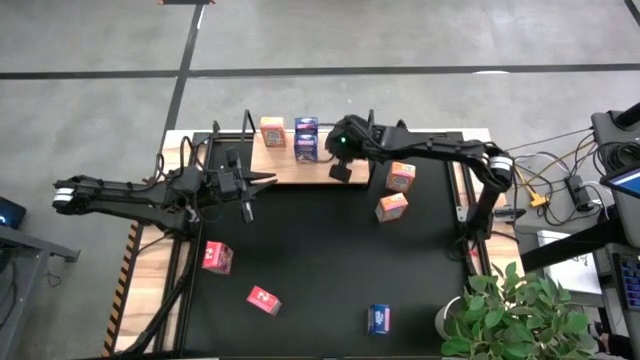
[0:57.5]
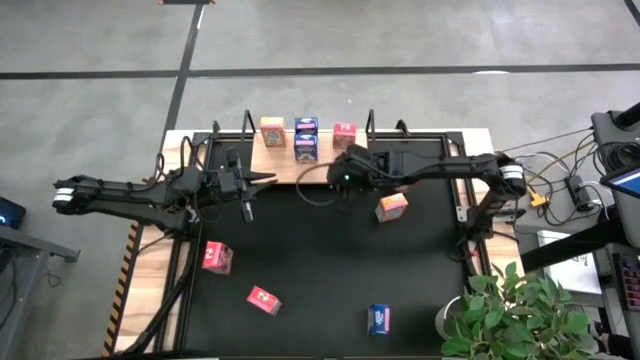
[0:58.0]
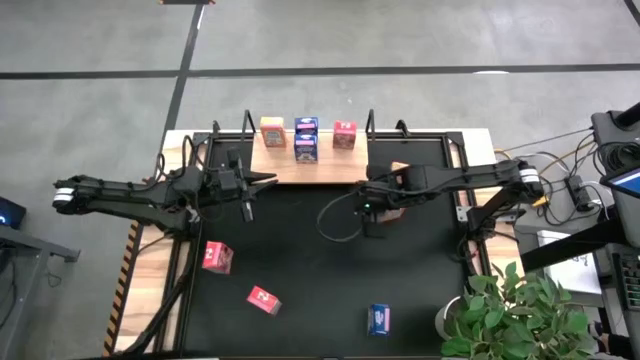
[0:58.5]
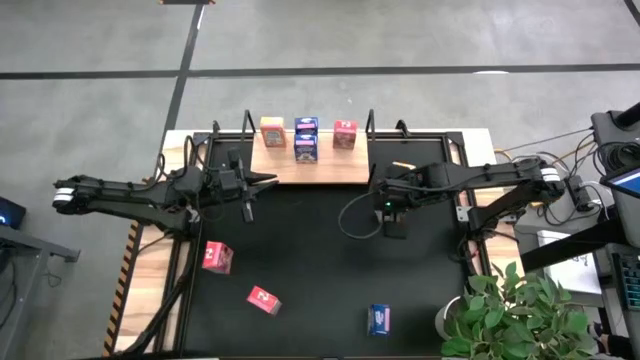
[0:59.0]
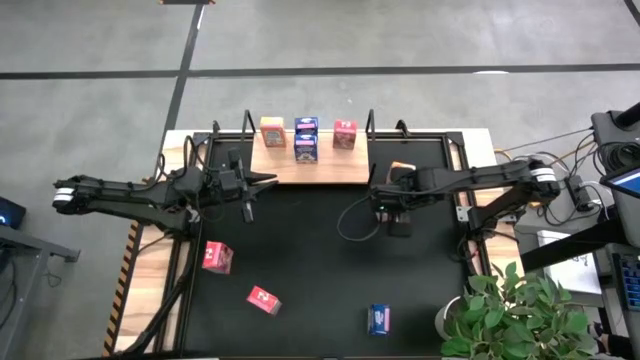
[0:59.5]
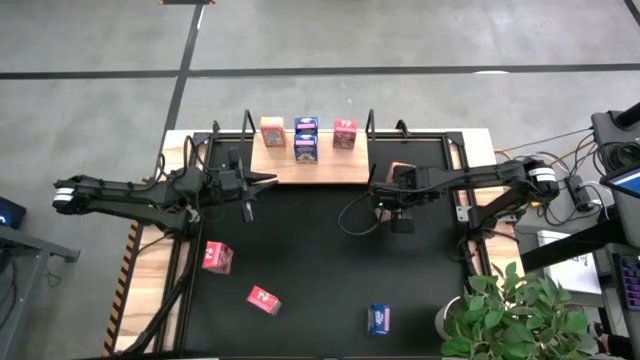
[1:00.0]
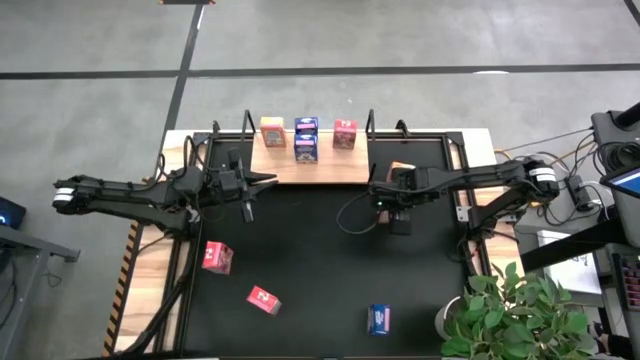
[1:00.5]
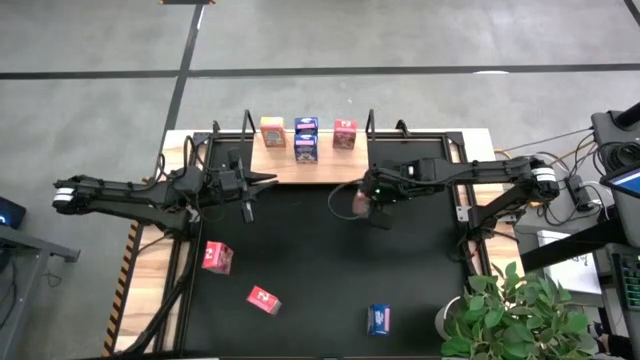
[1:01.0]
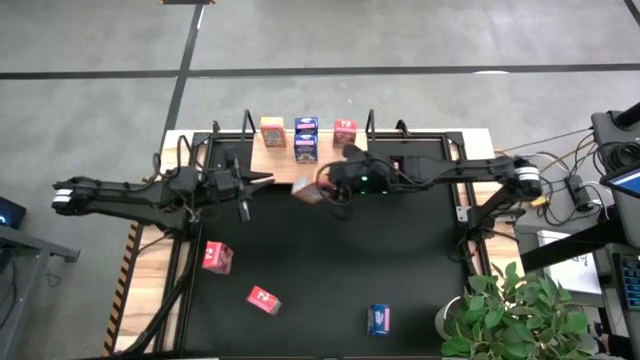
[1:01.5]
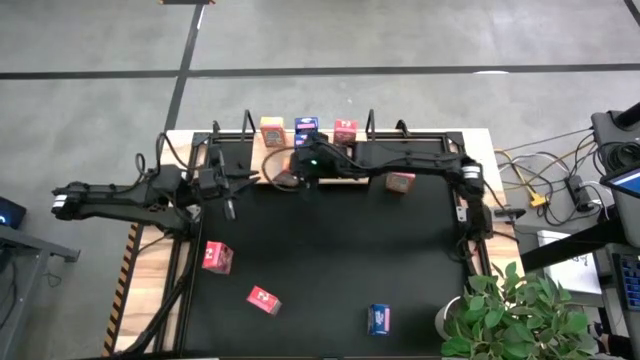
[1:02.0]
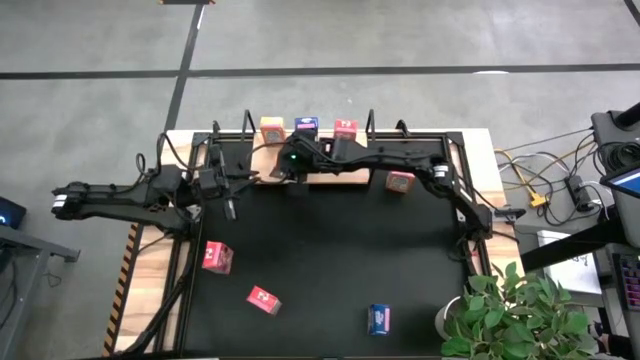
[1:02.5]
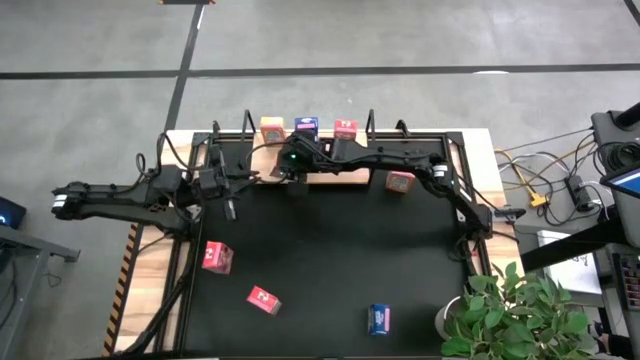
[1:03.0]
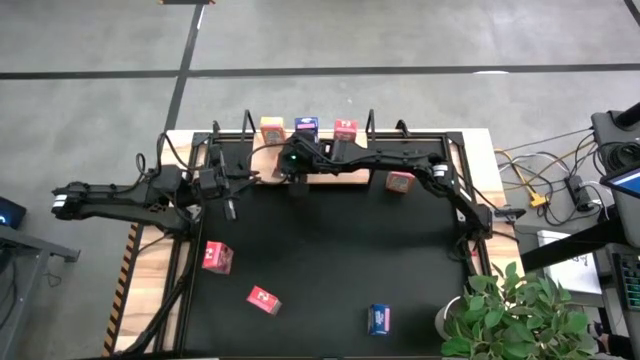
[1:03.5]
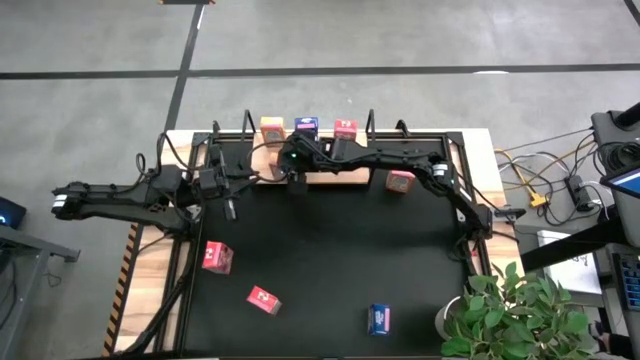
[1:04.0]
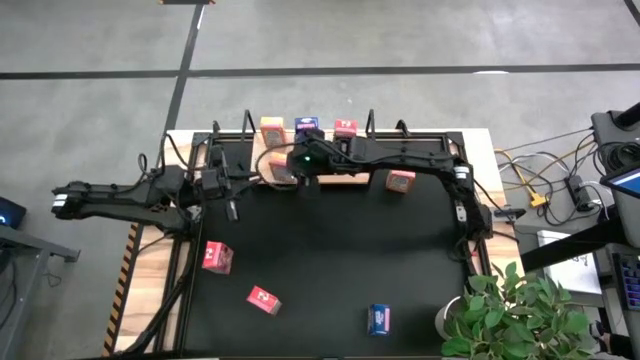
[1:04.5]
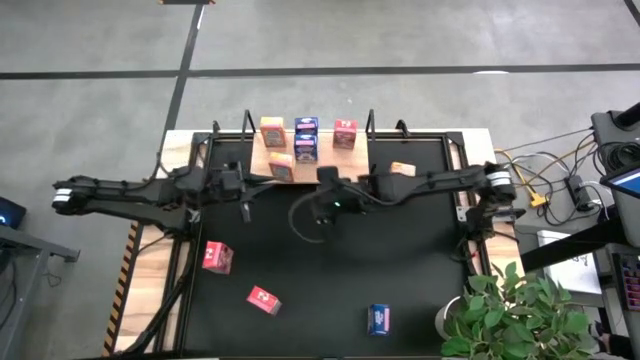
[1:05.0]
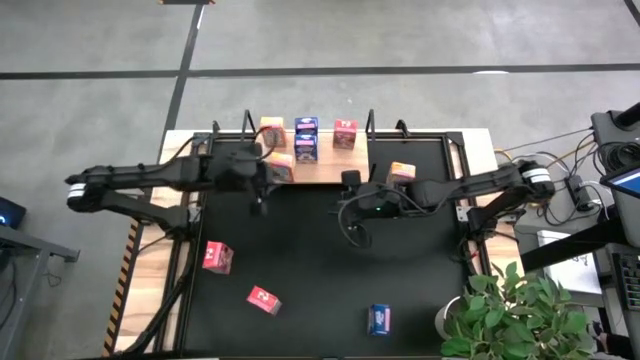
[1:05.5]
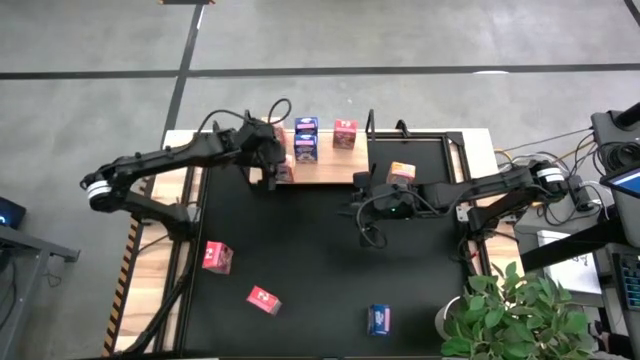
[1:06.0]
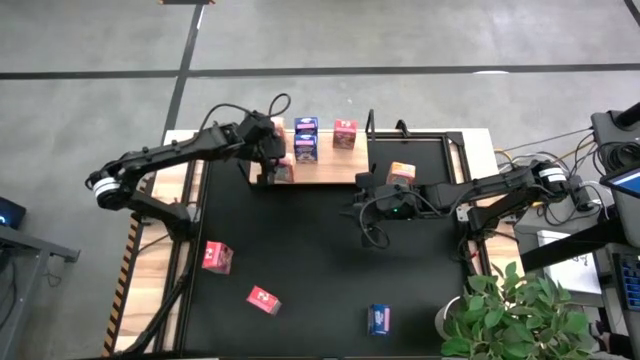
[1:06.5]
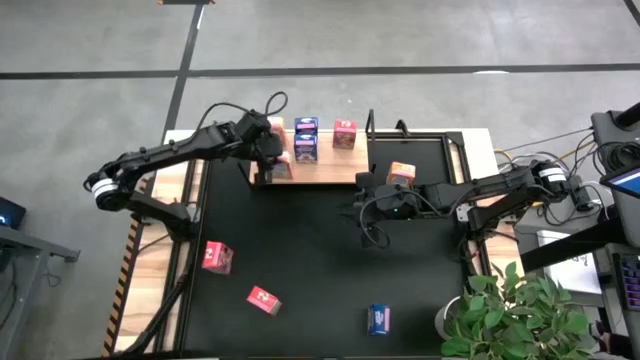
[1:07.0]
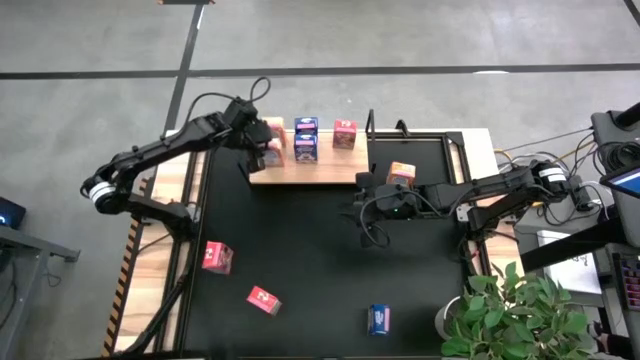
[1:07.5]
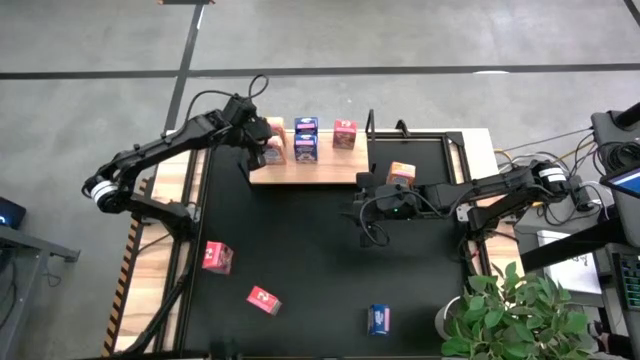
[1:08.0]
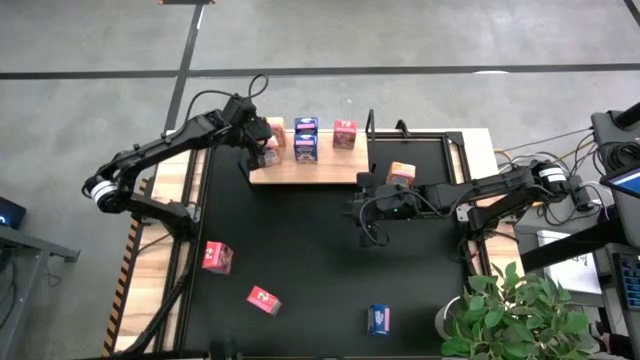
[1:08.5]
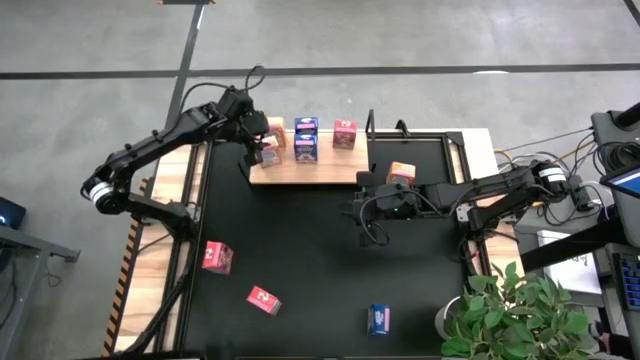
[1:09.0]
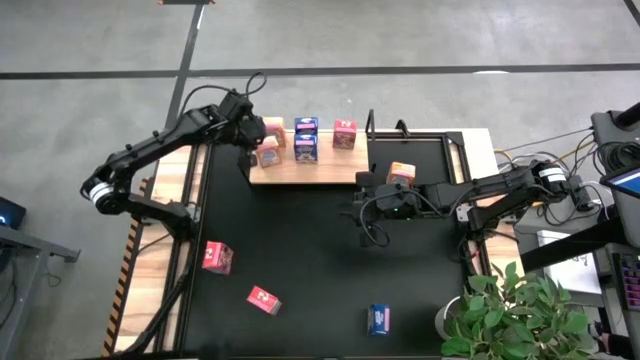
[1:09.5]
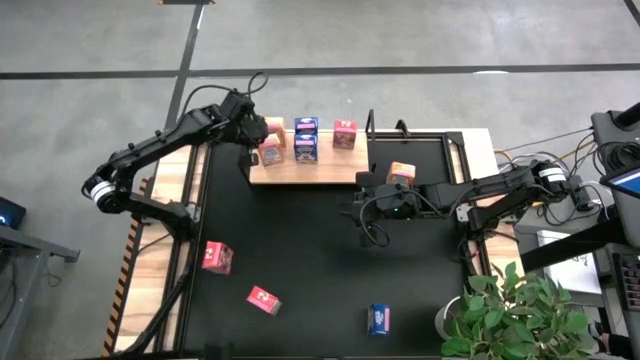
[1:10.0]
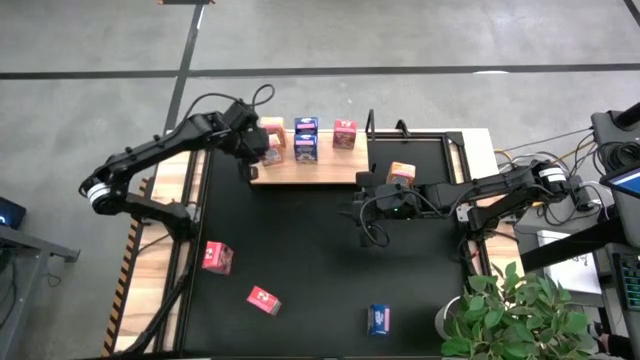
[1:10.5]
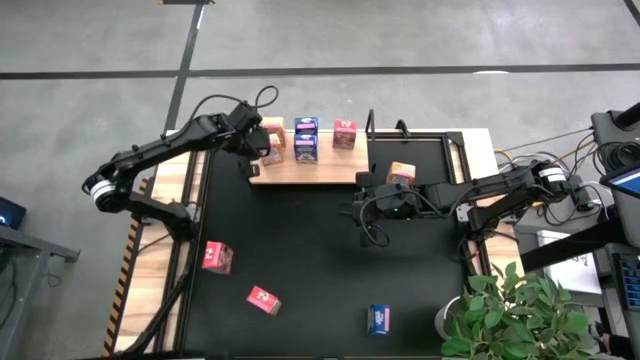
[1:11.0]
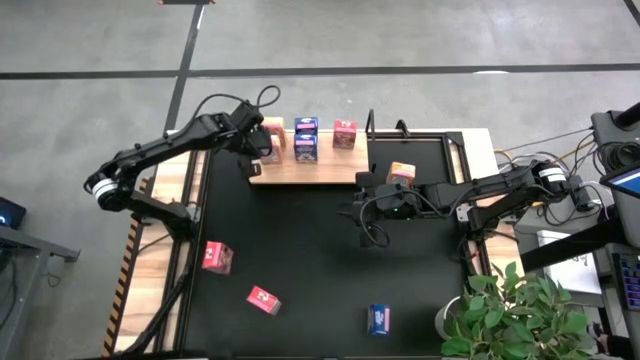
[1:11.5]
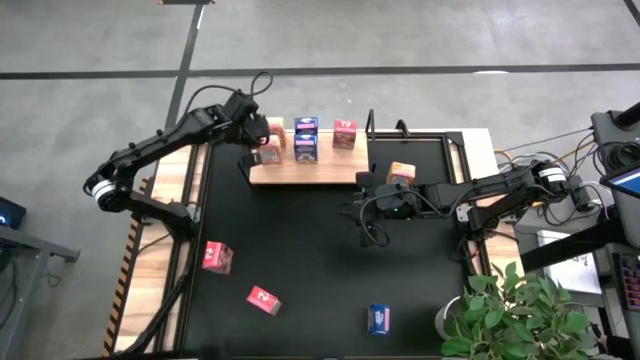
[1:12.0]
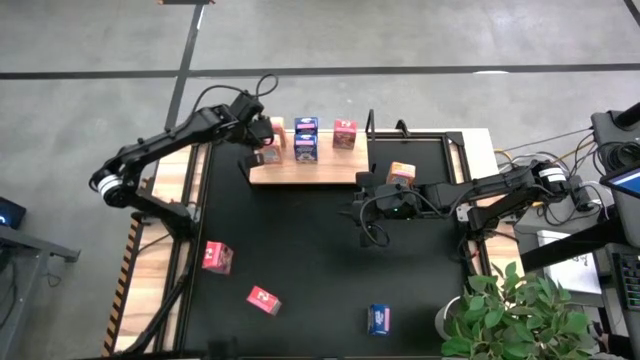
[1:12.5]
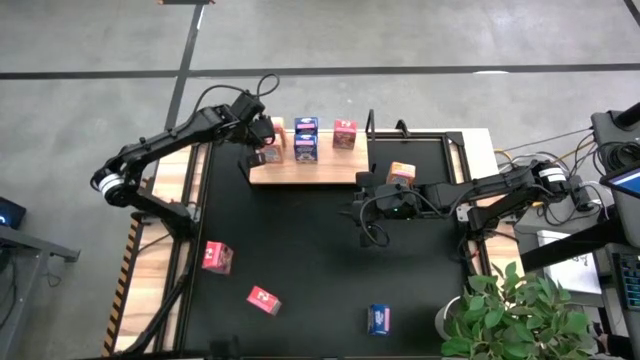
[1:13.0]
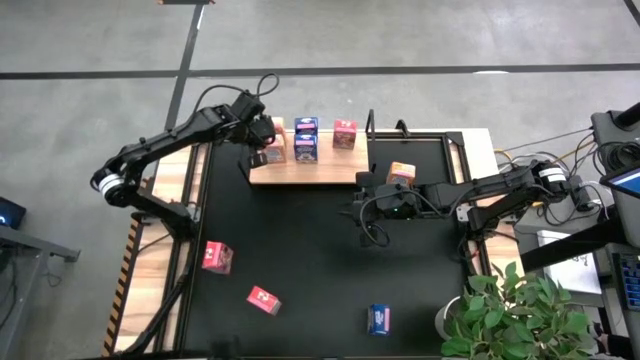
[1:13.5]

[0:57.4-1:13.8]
Task: Stack cereal on shelf
Put the bottom orange cereal box on the shelf aligned with other orange cereal box

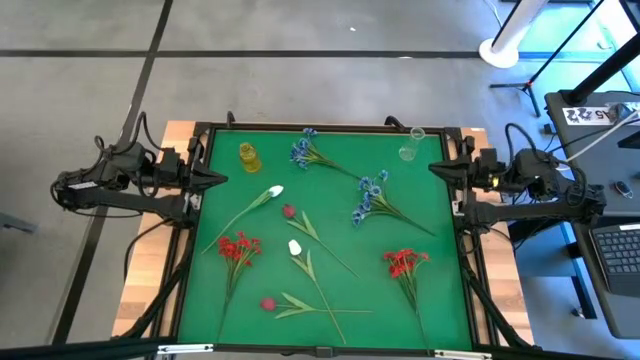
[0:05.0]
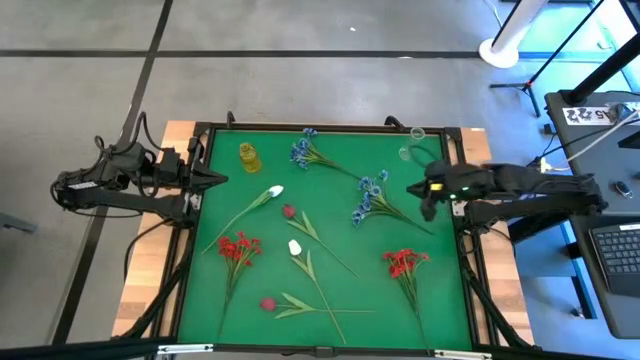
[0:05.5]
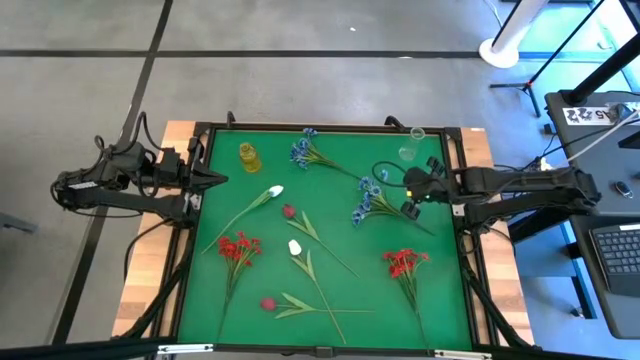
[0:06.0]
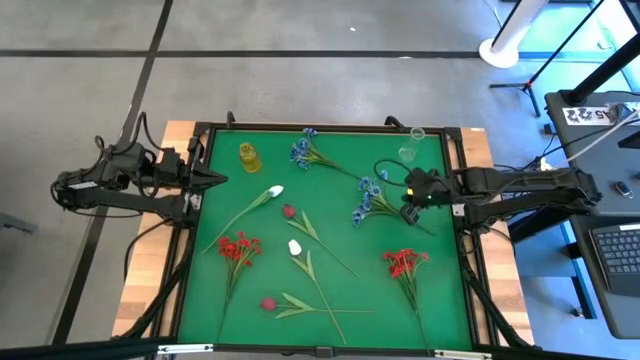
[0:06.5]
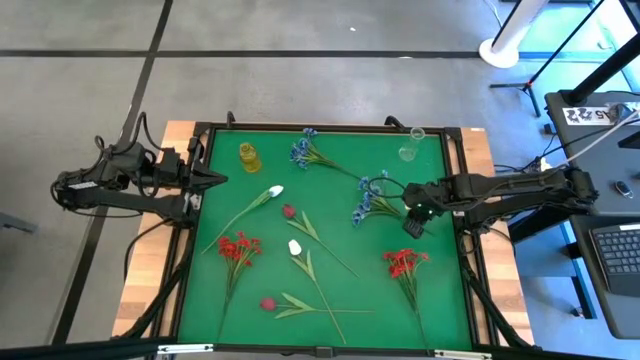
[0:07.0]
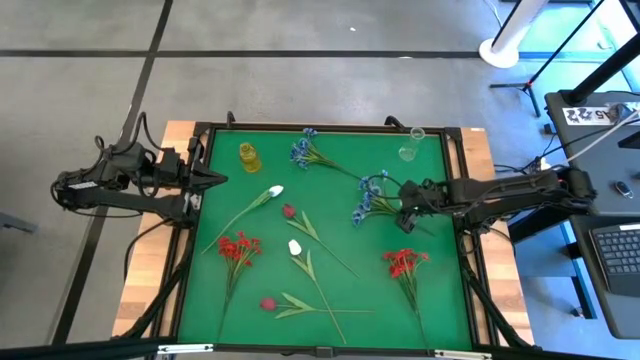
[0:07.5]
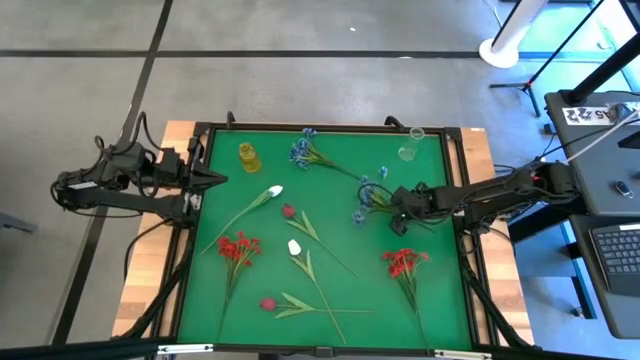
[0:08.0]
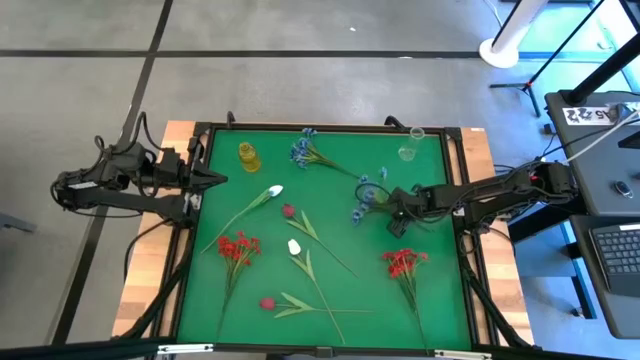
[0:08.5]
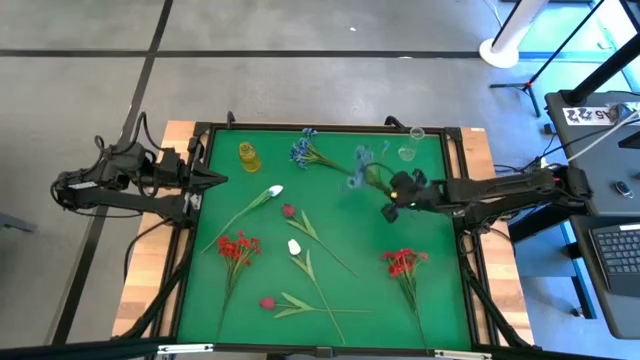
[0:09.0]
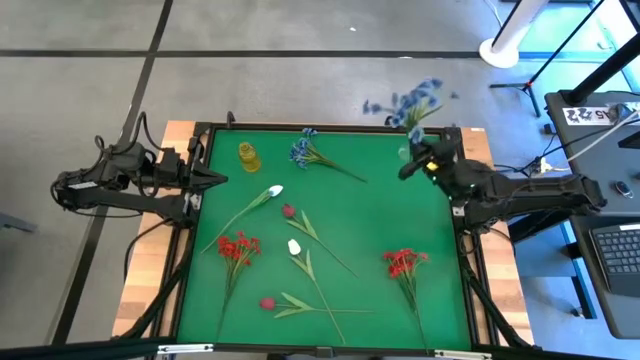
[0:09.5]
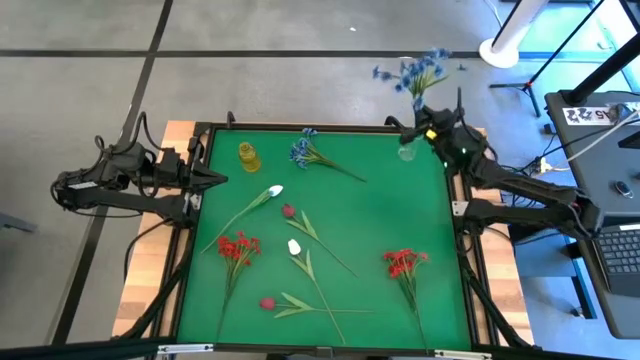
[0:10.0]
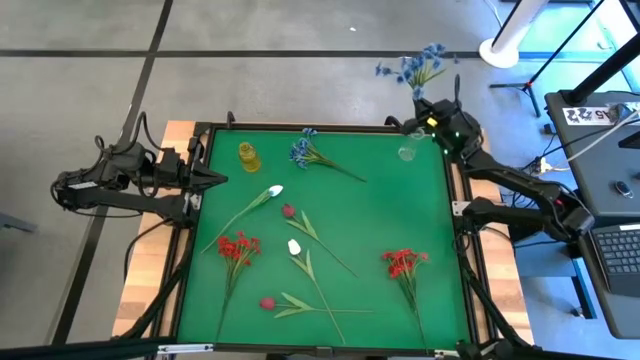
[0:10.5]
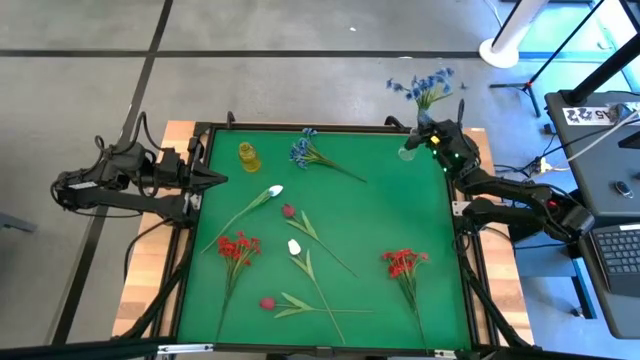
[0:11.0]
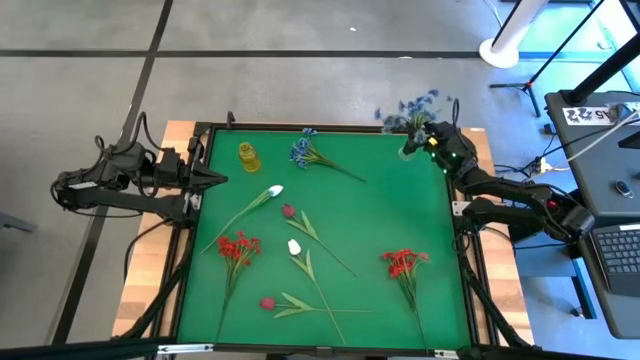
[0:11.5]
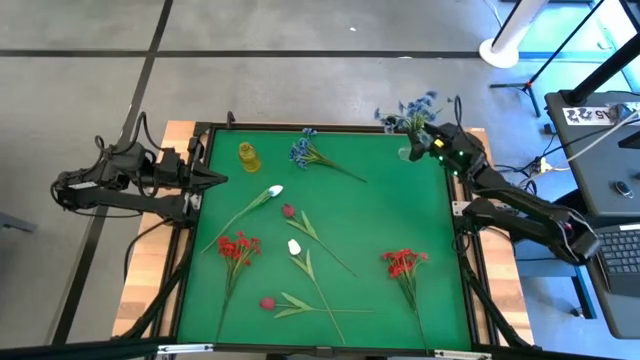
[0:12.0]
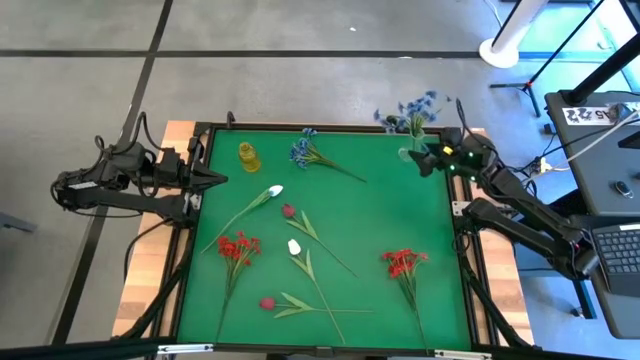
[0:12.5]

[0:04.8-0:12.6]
Task: Sort flowers into vase by color
Put the bottom light blue flowers into the transparent vase
